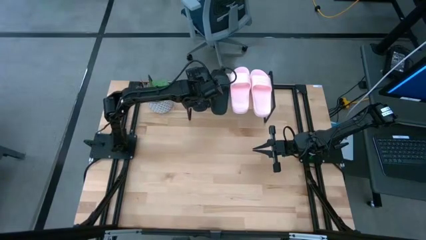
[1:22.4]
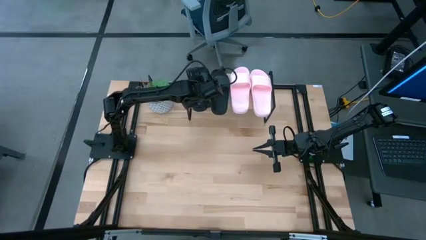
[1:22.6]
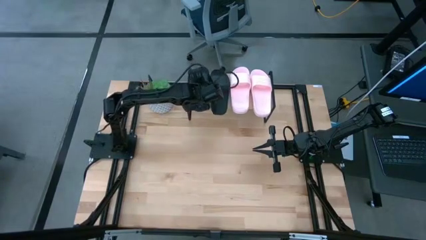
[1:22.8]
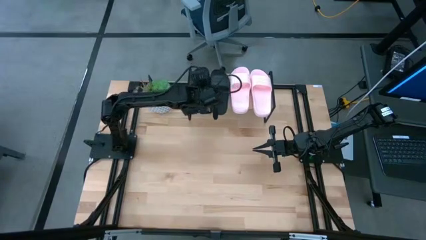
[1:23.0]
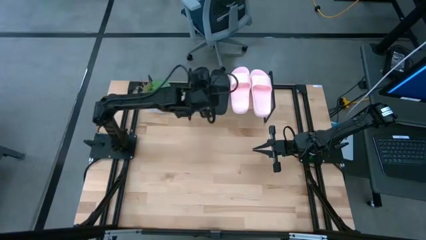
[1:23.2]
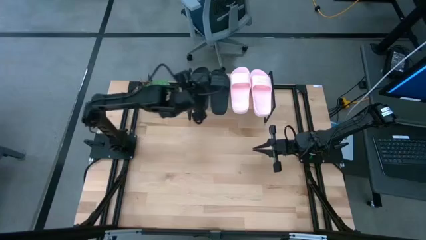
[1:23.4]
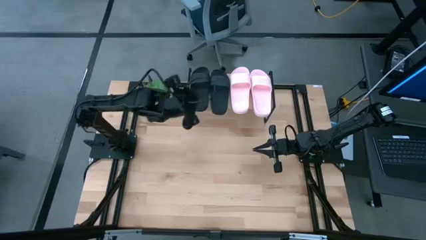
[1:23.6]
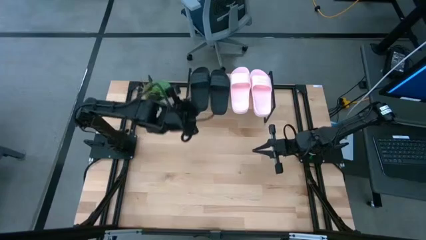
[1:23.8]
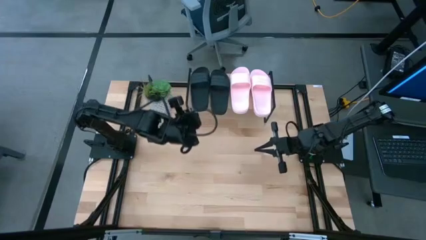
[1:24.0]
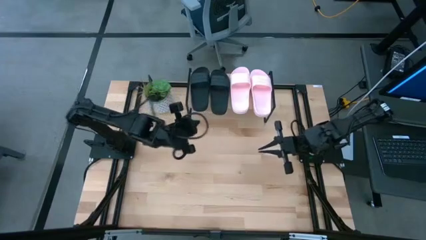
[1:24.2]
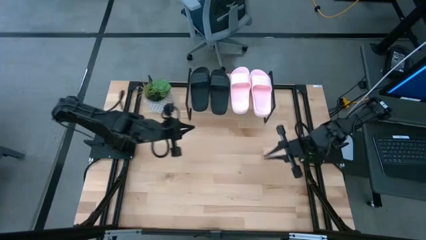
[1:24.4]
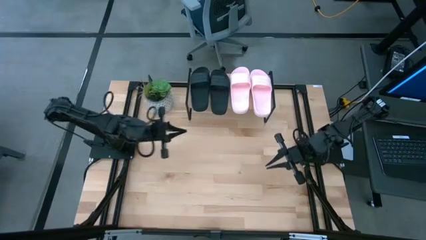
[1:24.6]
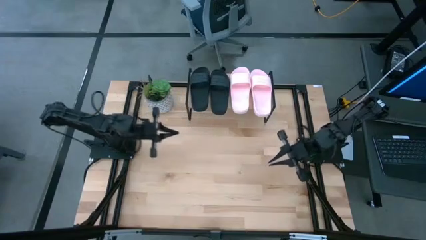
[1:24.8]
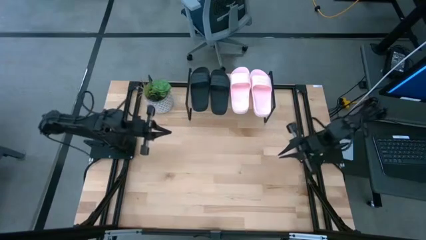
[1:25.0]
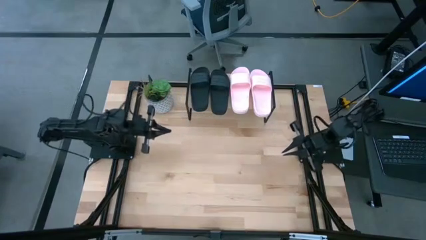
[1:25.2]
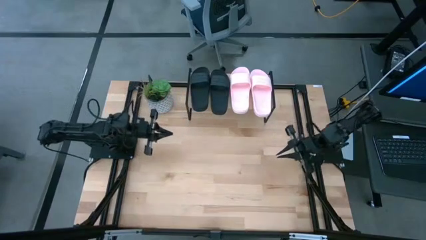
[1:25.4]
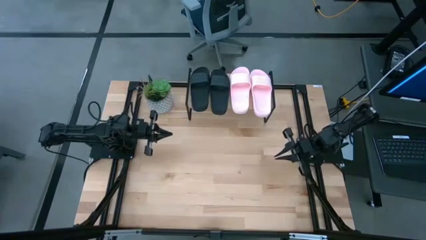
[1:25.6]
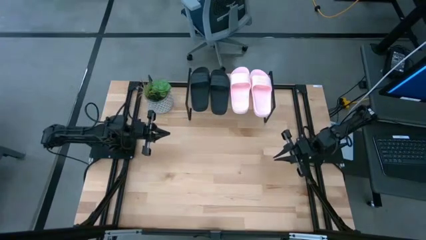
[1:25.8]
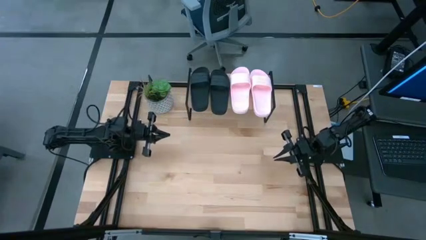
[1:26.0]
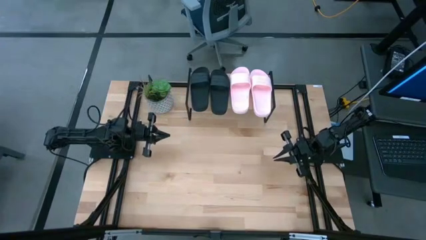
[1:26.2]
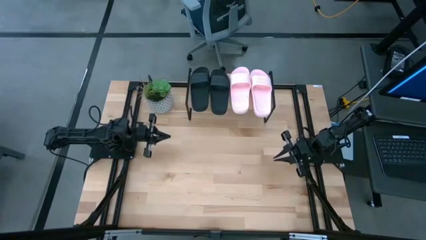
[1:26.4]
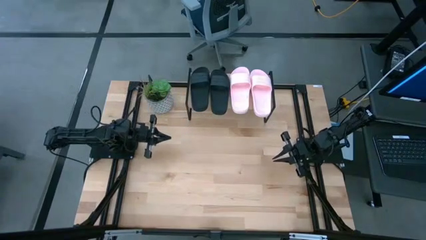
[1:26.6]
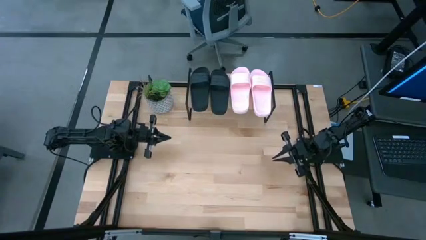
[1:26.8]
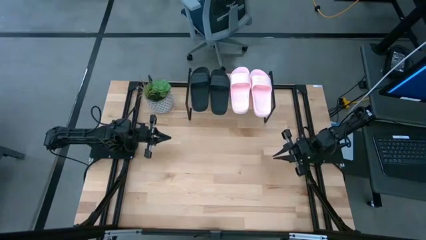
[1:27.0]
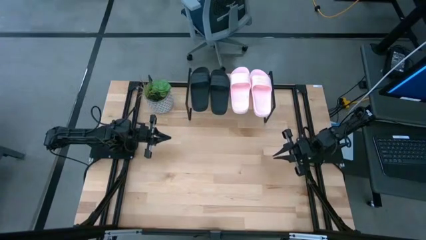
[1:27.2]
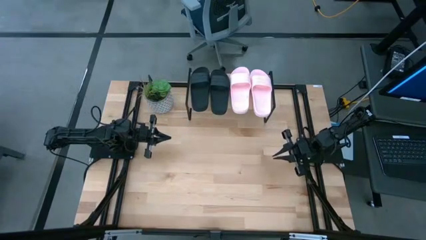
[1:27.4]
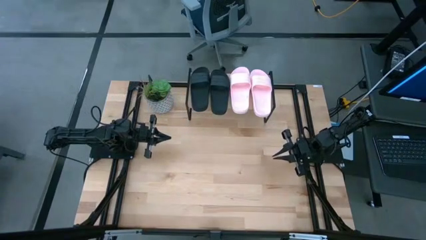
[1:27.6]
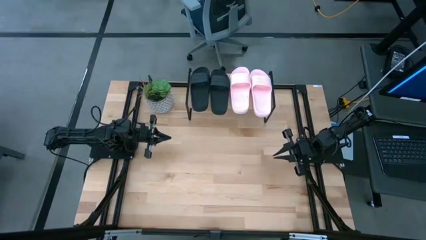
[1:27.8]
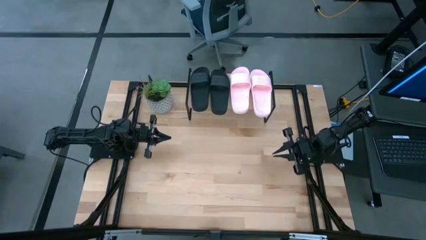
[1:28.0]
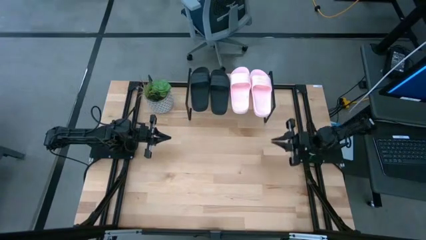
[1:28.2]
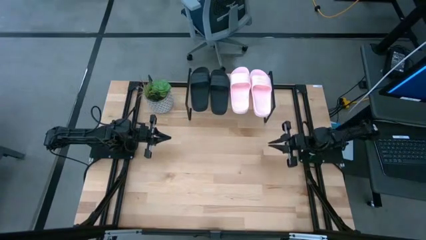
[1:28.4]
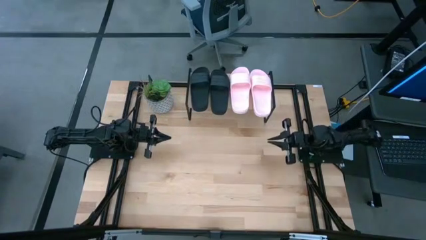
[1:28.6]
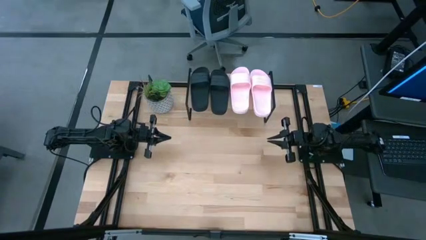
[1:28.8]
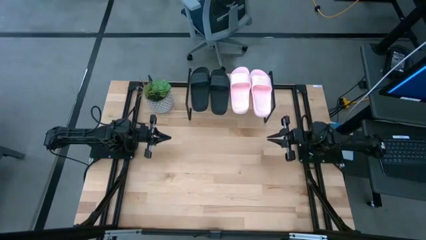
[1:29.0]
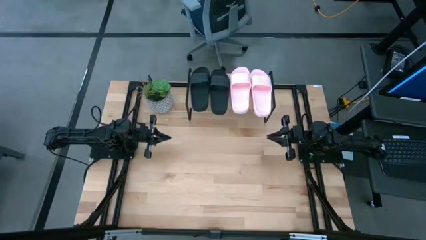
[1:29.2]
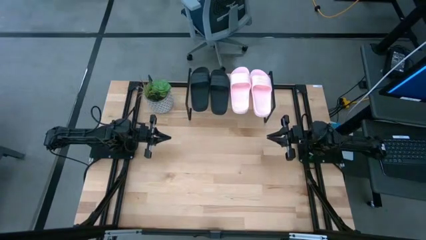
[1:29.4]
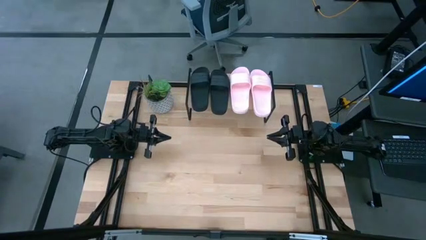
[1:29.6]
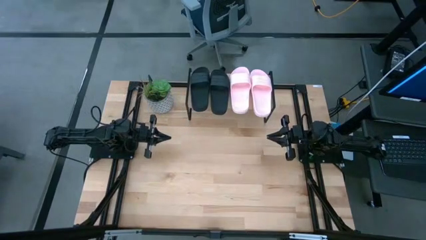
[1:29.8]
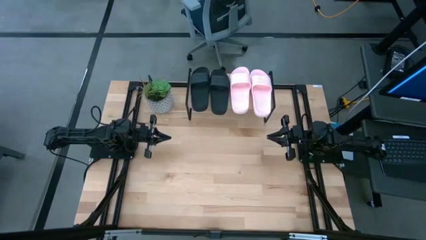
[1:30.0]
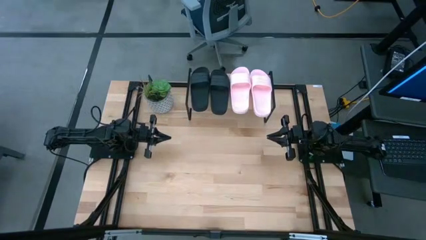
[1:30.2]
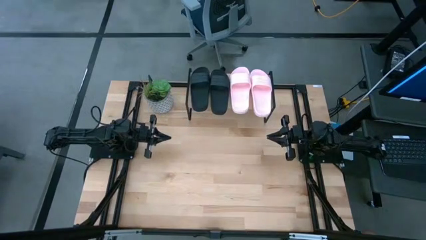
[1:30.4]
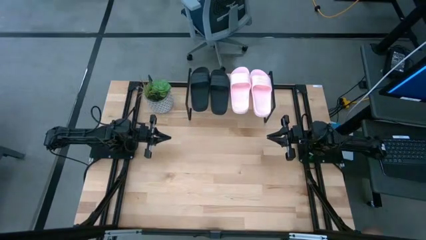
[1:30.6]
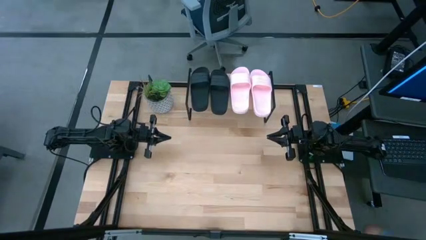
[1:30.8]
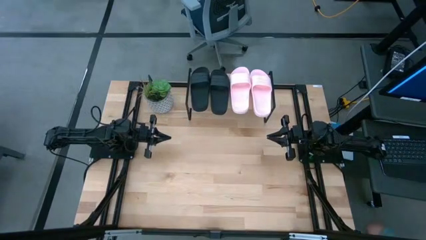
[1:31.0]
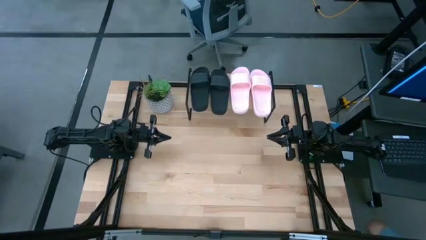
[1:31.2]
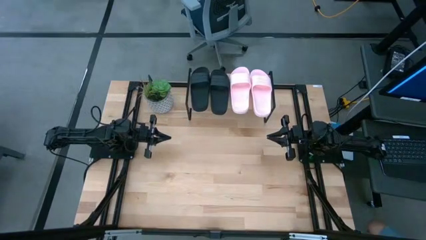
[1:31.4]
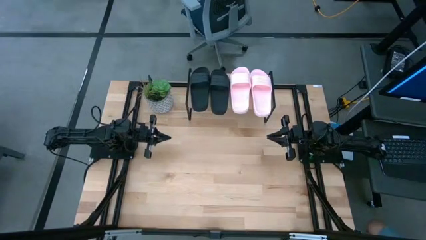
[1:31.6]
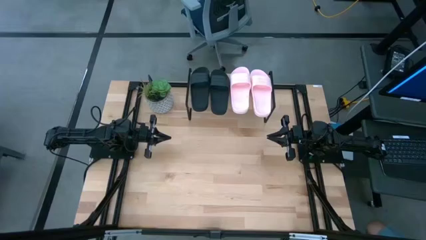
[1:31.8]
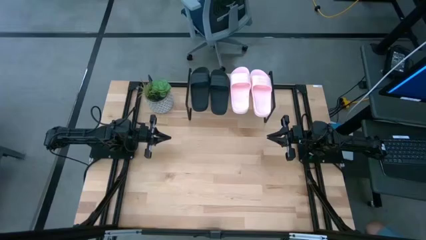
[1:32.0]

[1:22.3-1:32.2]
Task: Pick and place slides into the shelf
Return to Home Position
